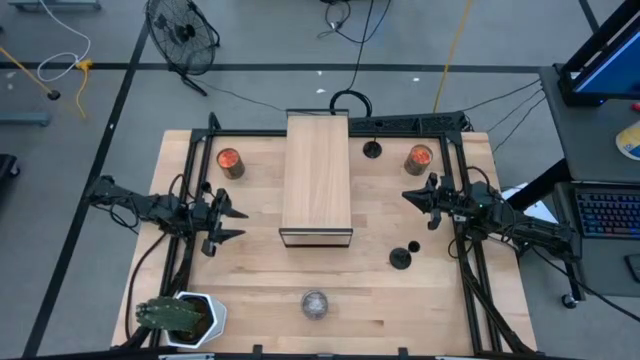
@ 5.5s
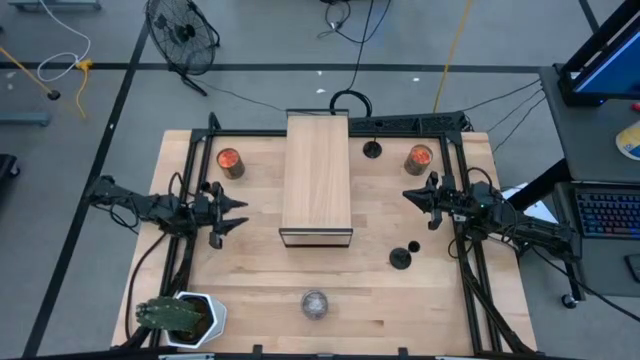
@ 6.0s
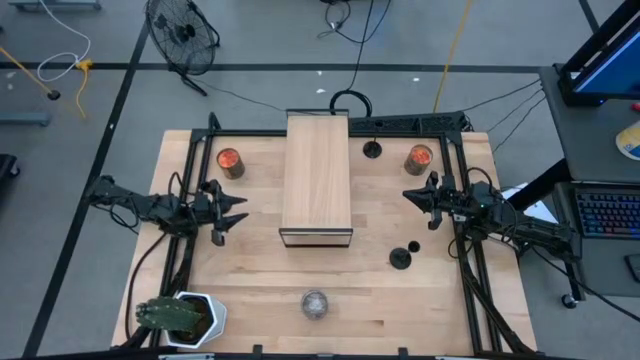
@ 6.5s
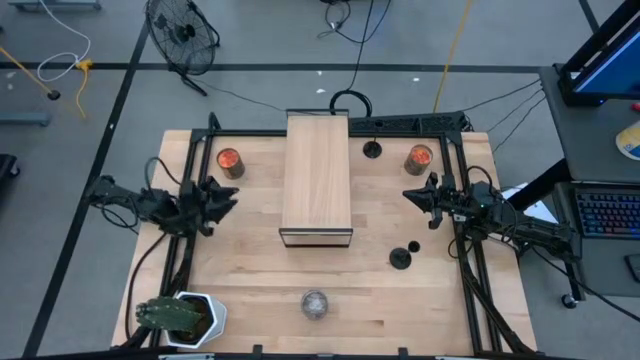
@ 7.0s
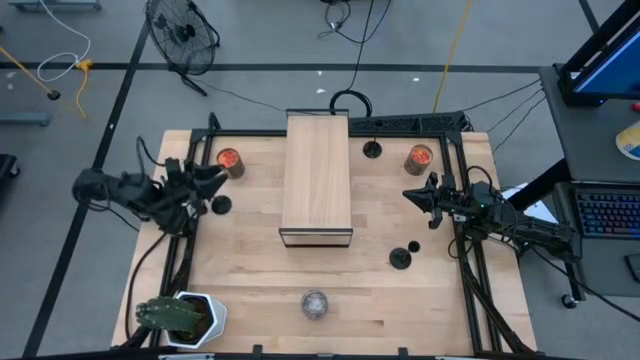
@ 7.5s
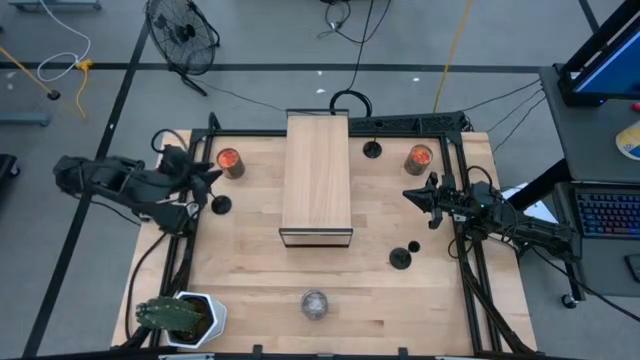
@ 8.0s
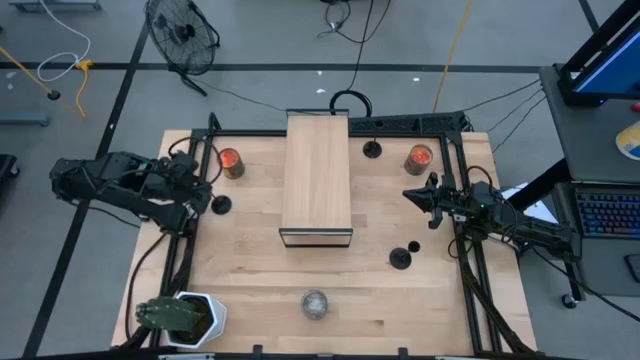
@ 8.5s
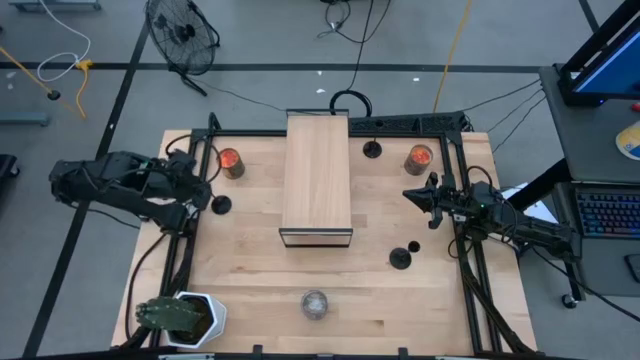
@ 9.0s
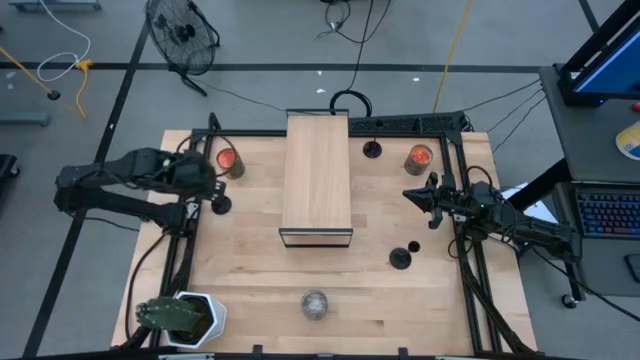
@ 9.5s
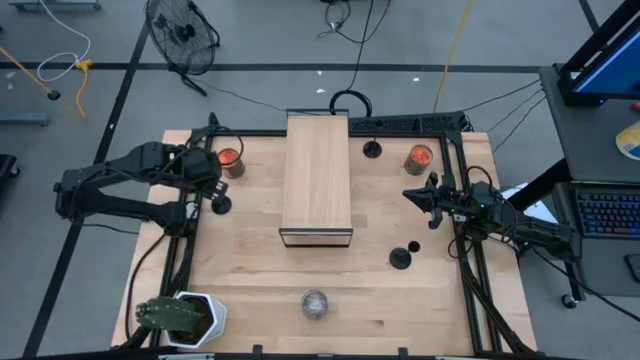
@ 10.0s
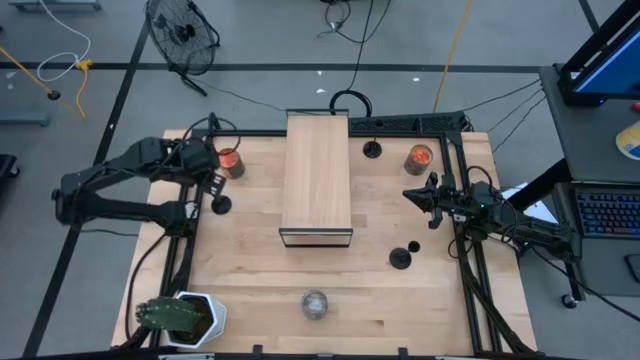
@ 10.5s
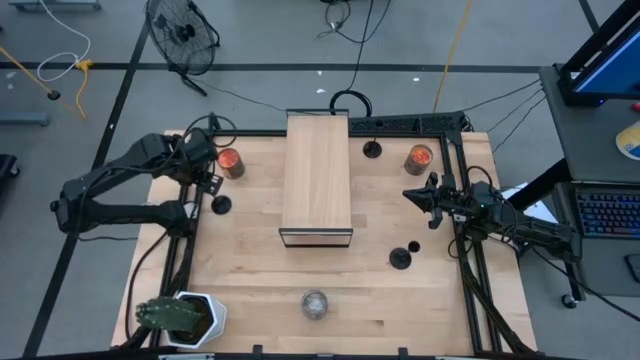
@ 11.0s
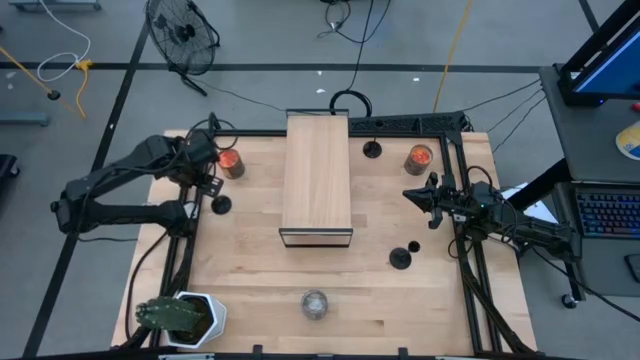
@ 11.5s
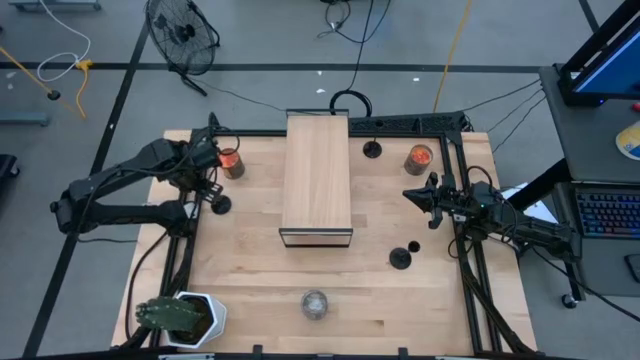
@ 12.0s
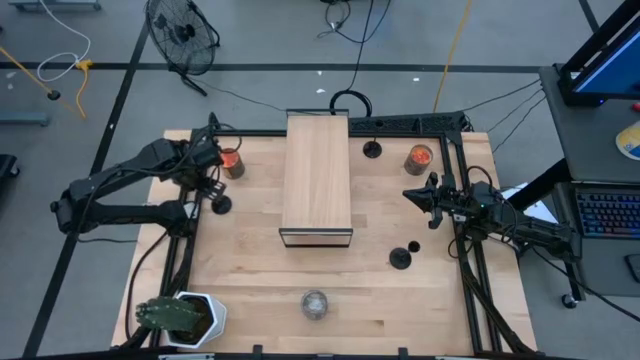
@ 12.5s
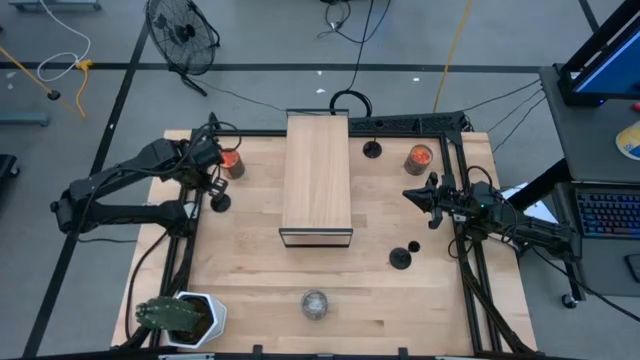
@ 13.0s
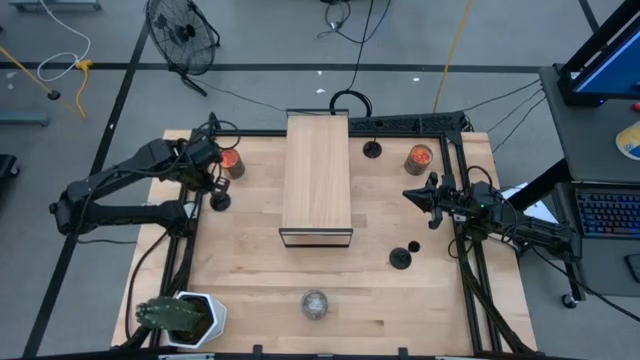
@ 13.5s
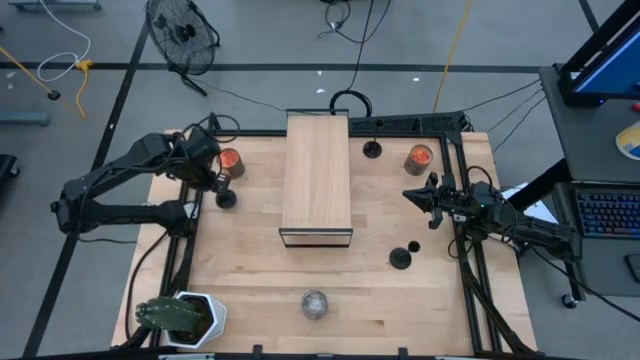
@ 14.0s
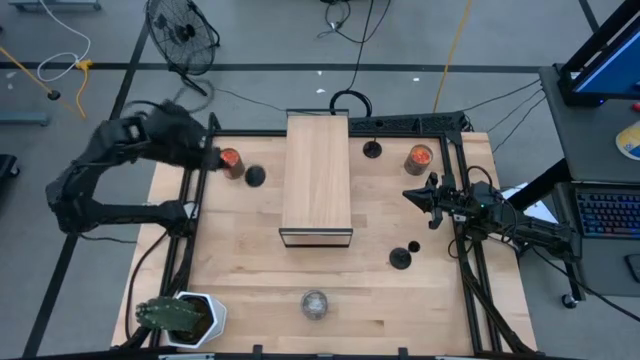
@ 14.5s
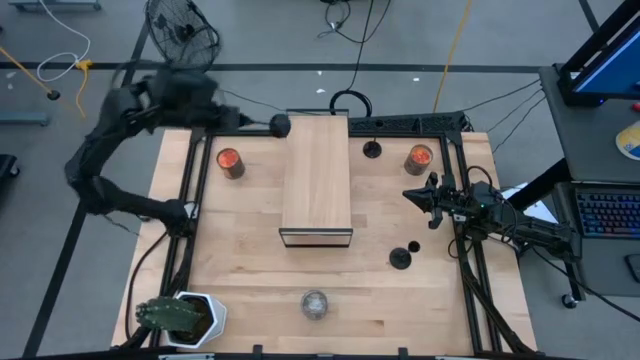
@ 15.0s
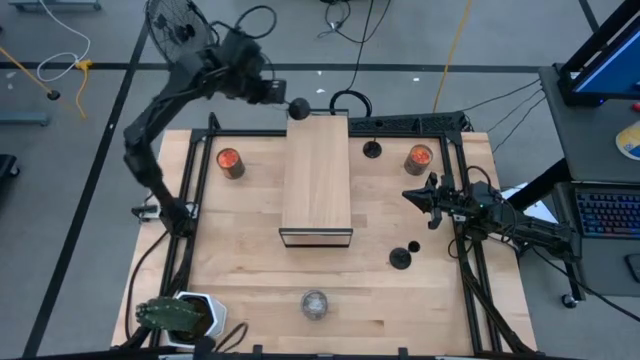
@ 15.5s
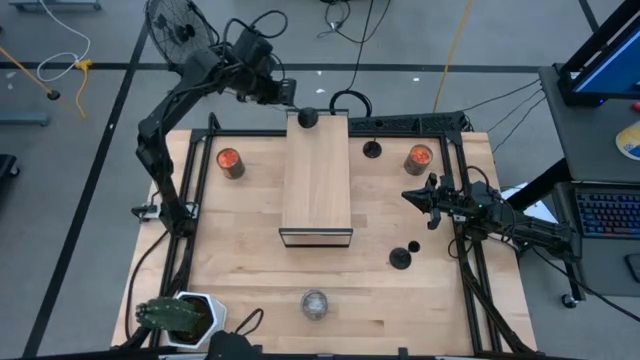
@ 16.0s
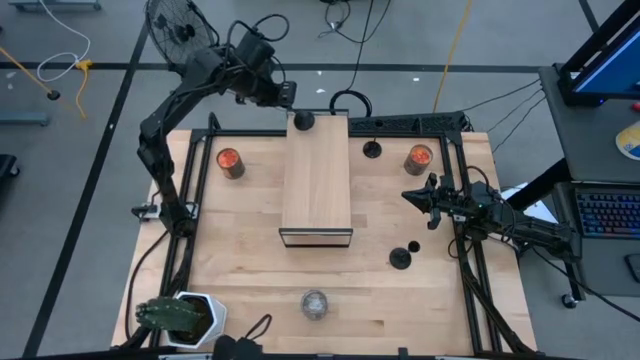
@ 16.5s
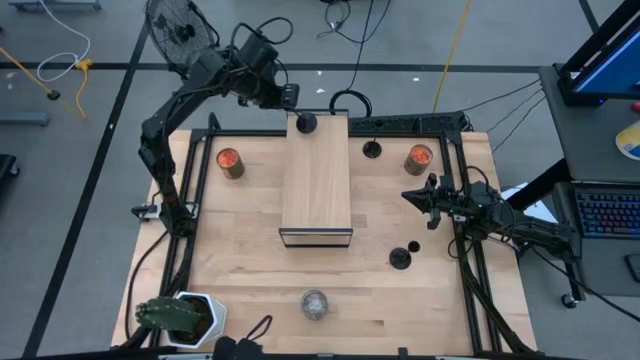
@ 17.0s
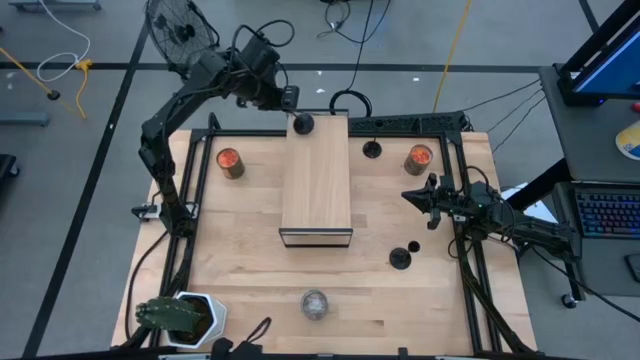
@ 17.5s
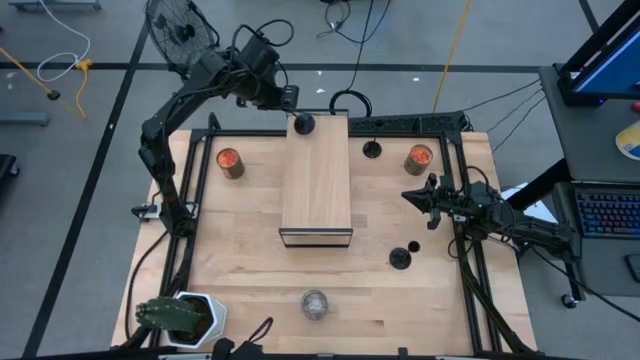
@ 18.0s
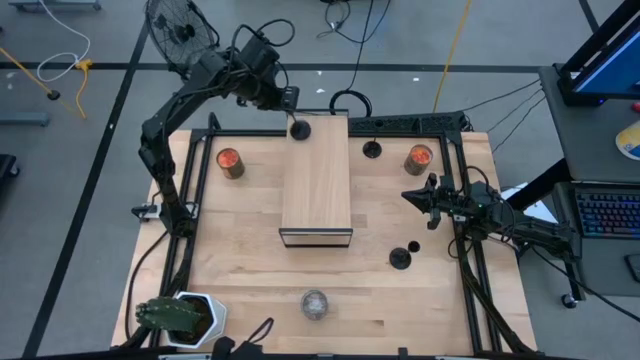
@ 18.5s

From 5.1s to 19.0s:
Task: Pick & Place candle stick holders
Put the left candlestick holder on the shelf

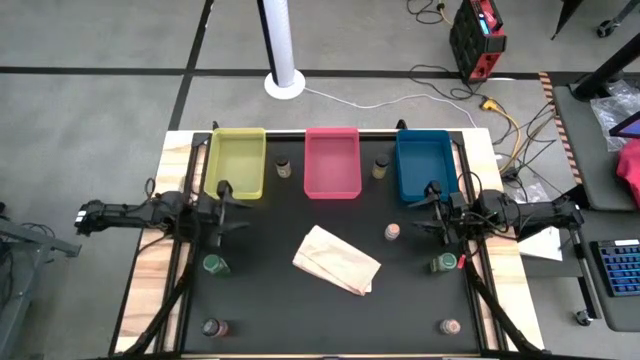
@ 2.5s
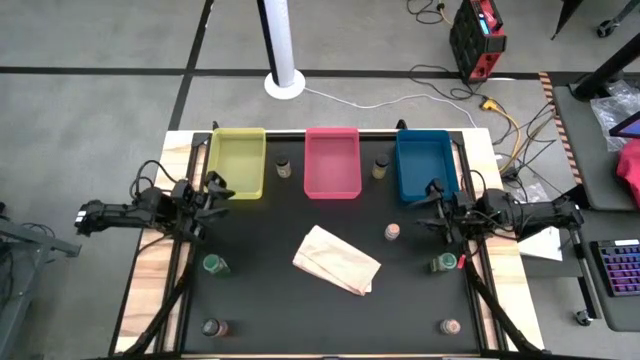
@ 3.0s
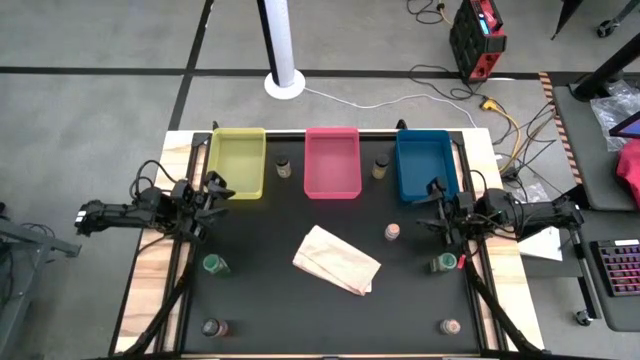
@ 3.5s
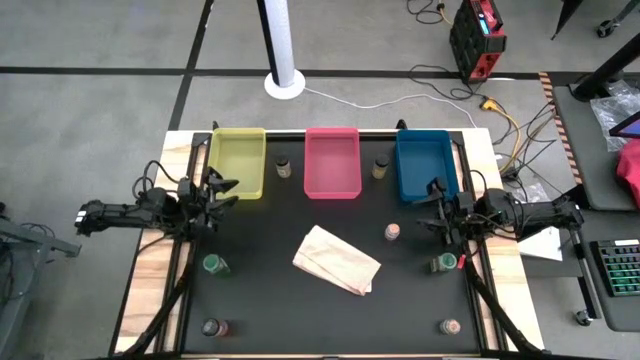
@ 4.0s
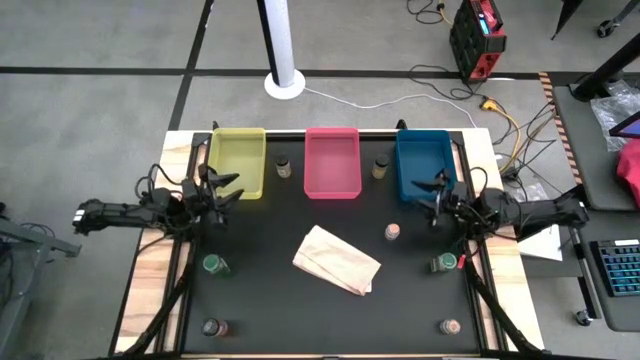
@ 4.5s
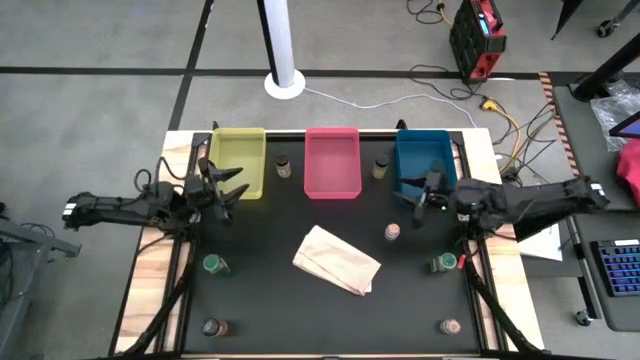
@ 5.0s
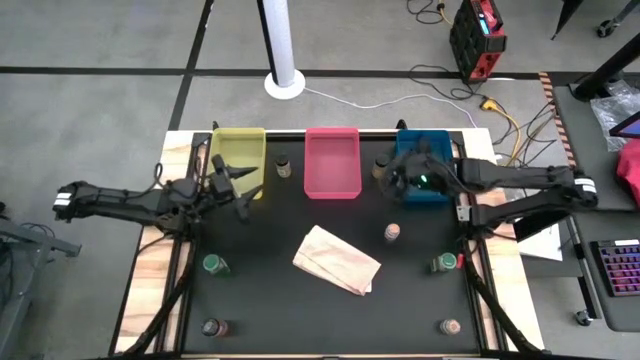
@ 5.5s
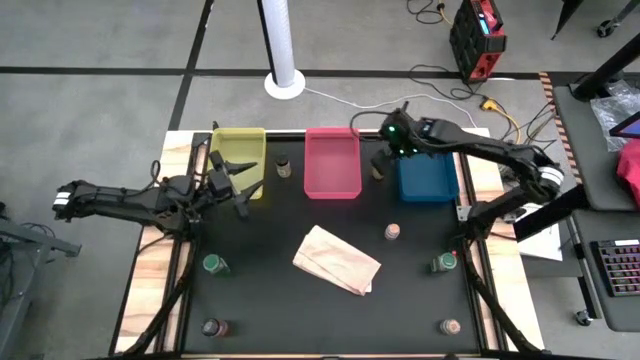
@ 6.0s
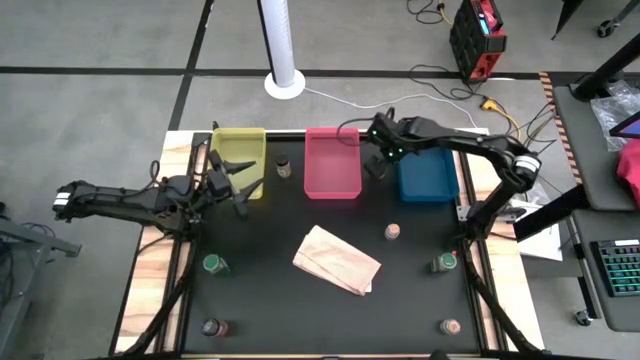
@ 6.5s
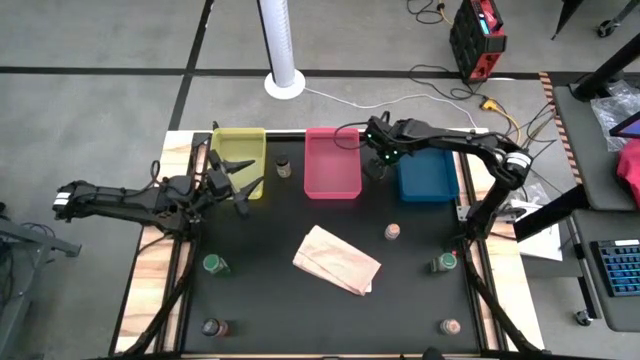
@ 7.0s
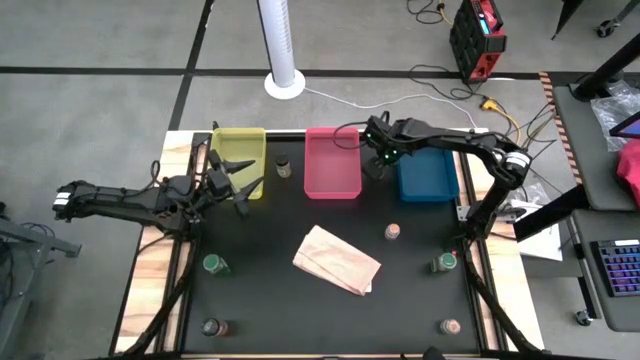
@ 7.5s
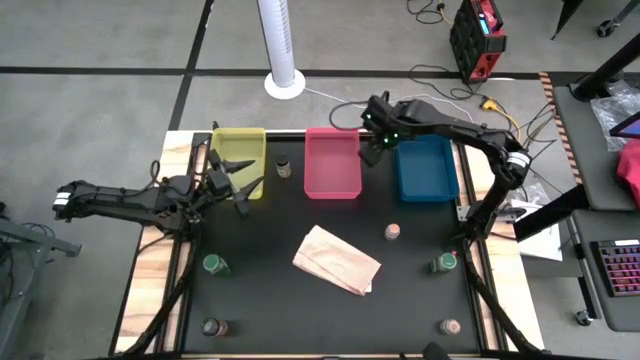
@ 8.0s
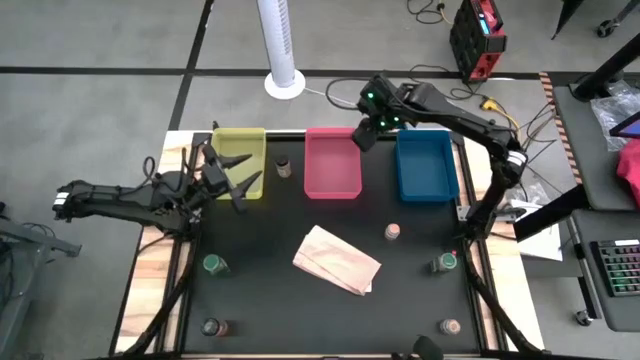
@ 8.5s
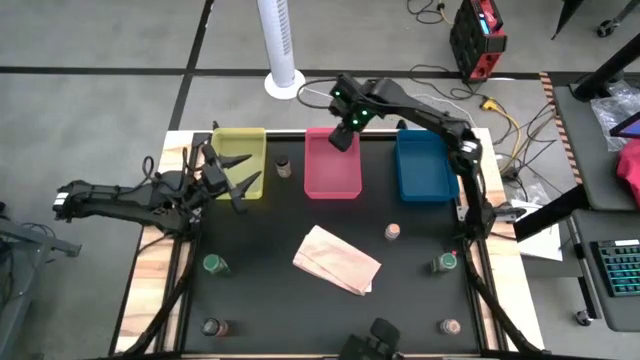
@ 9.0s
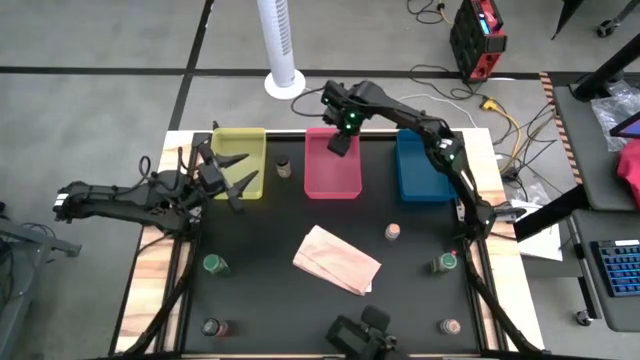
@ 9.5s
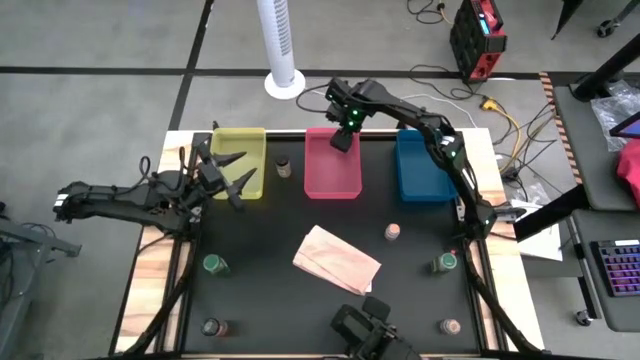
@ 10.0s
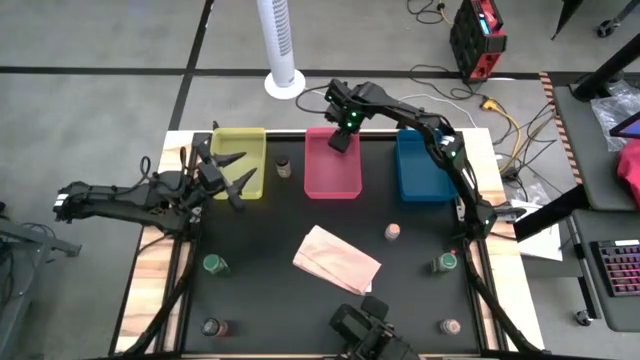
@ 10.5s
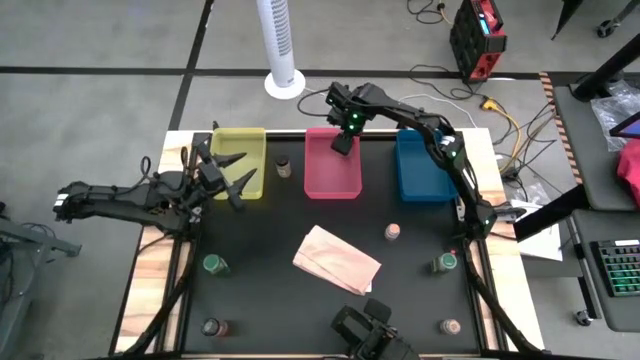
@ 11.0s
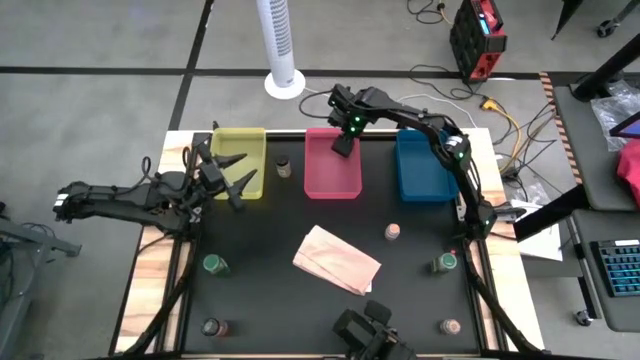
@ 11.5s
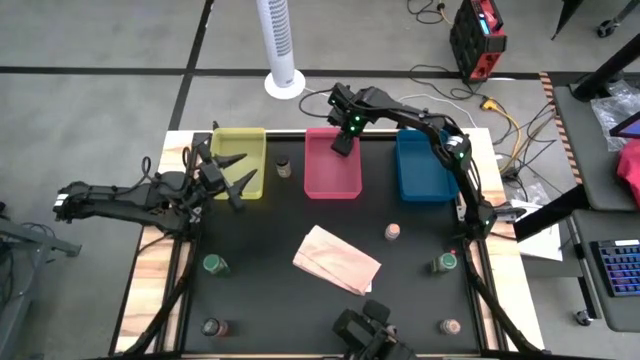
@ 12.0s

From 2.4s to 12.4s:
Task: Sort spices by type
Put the top right black seasoning bottle into the pink bin
